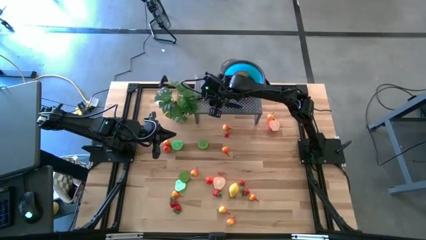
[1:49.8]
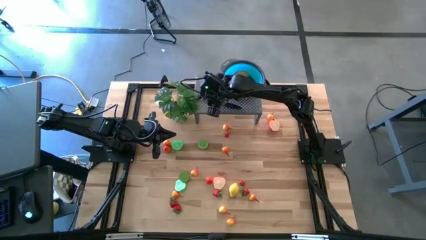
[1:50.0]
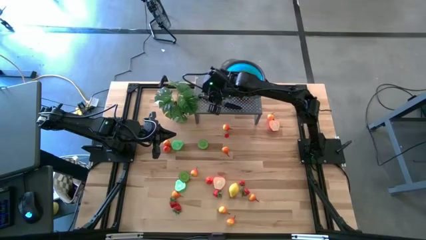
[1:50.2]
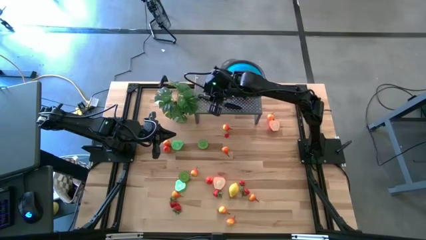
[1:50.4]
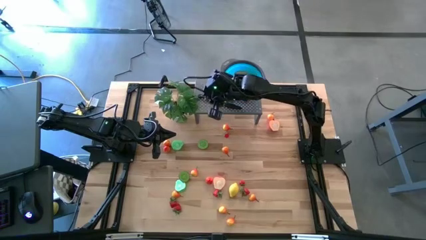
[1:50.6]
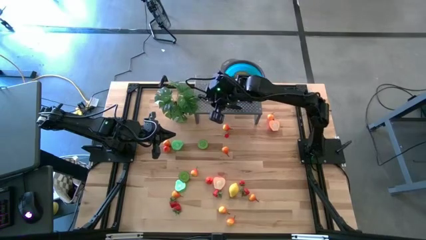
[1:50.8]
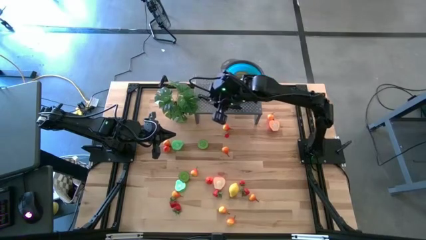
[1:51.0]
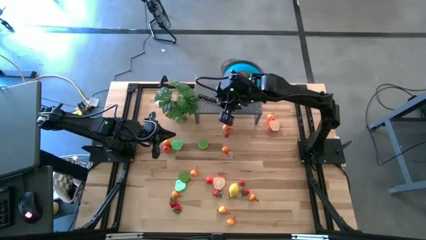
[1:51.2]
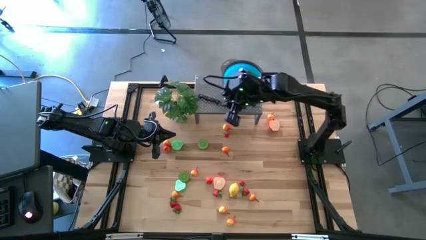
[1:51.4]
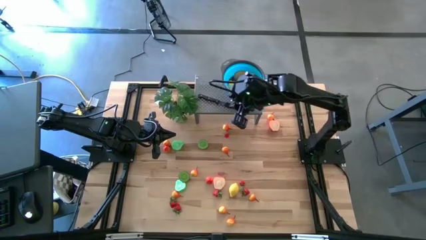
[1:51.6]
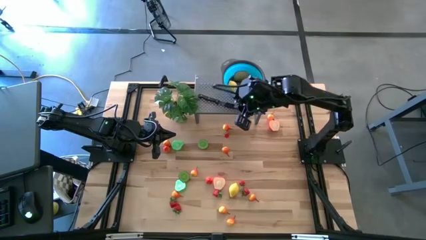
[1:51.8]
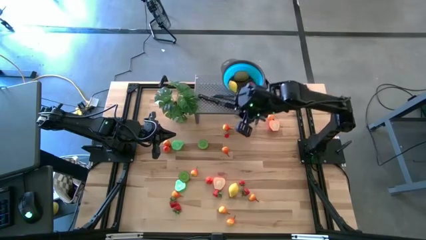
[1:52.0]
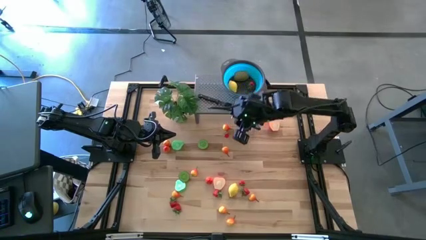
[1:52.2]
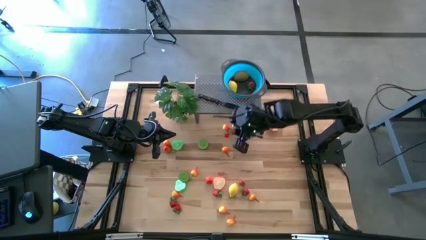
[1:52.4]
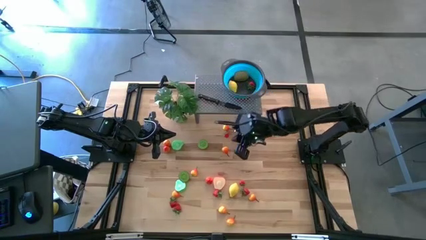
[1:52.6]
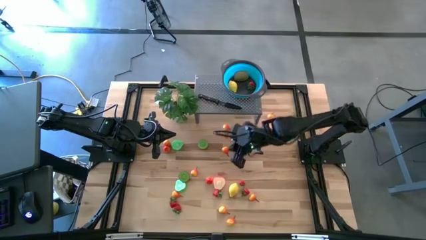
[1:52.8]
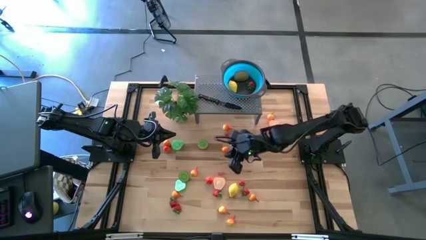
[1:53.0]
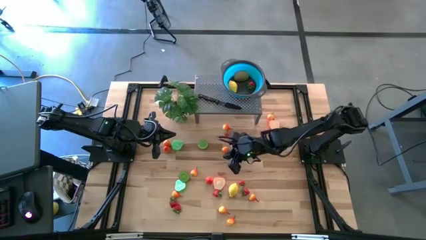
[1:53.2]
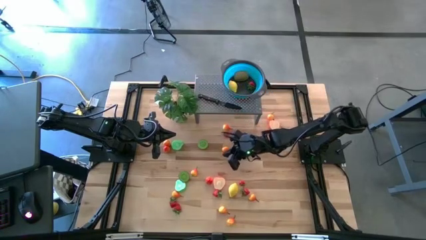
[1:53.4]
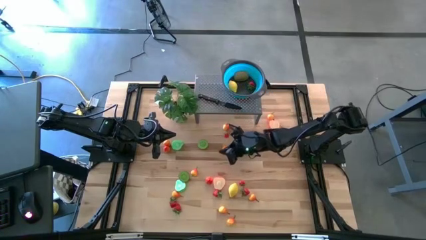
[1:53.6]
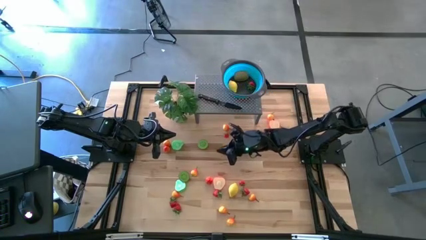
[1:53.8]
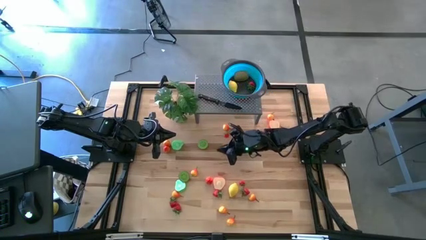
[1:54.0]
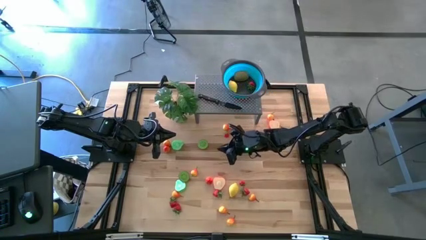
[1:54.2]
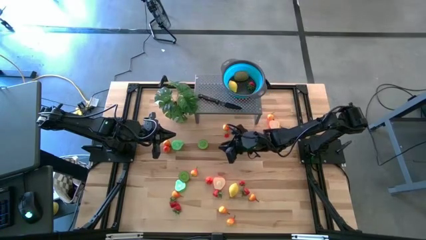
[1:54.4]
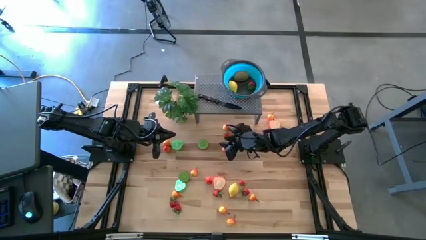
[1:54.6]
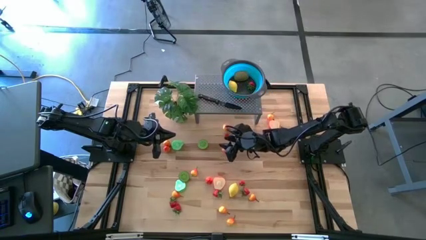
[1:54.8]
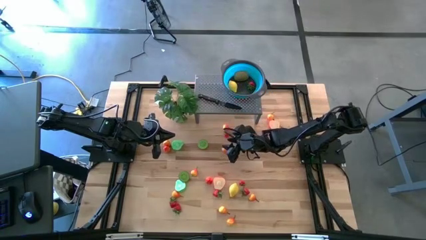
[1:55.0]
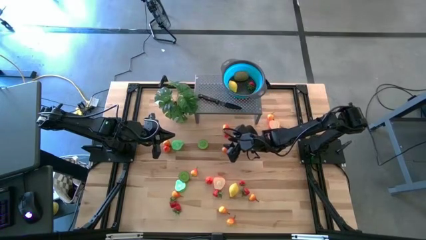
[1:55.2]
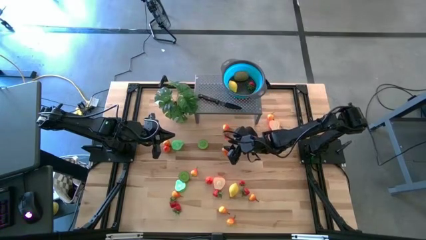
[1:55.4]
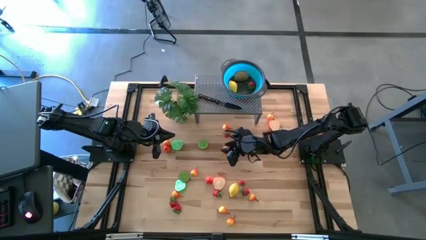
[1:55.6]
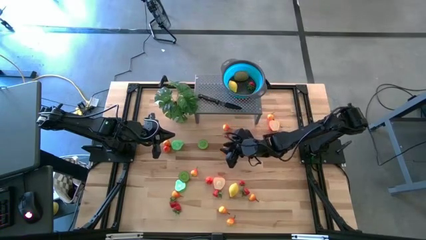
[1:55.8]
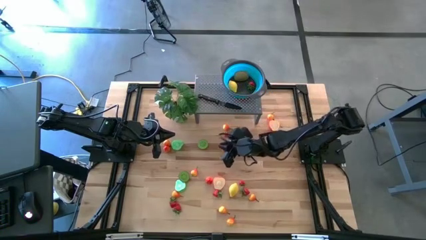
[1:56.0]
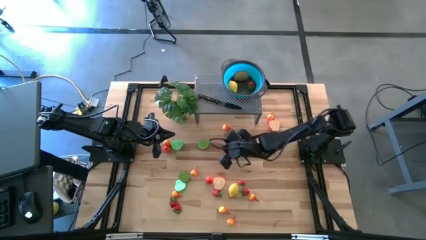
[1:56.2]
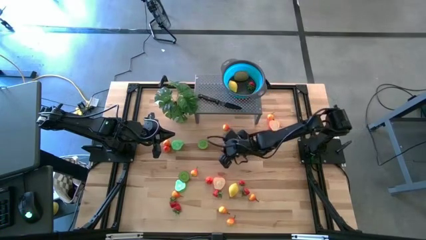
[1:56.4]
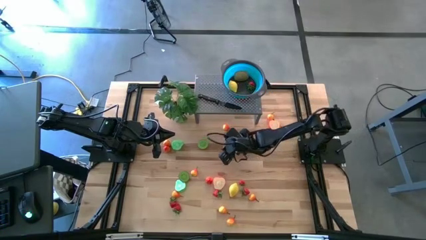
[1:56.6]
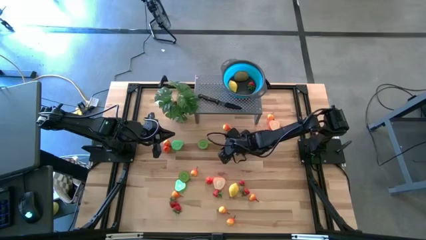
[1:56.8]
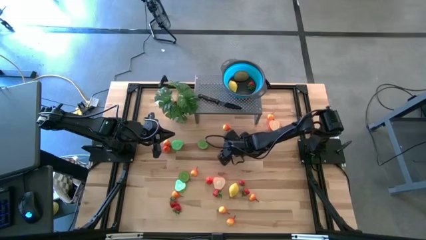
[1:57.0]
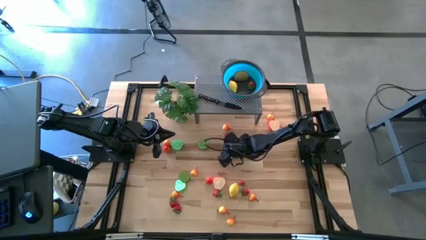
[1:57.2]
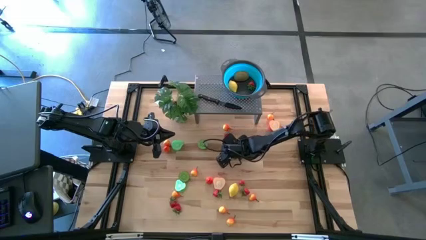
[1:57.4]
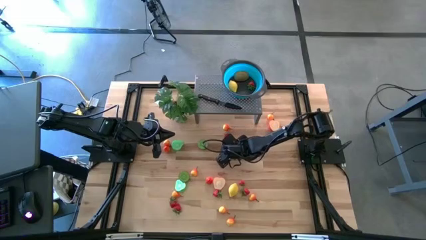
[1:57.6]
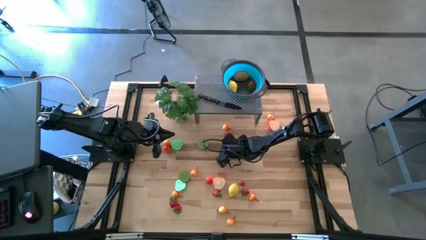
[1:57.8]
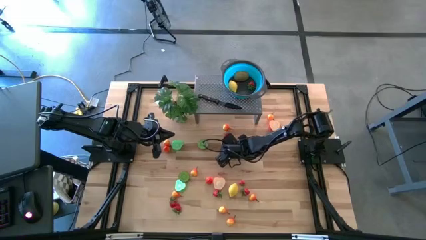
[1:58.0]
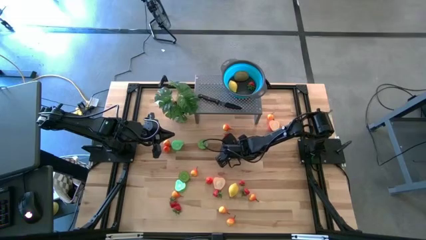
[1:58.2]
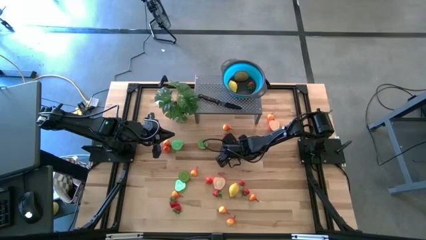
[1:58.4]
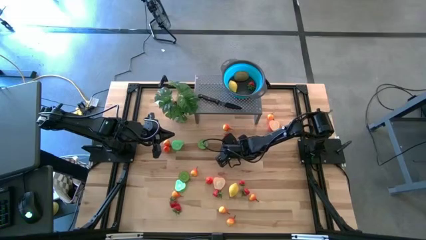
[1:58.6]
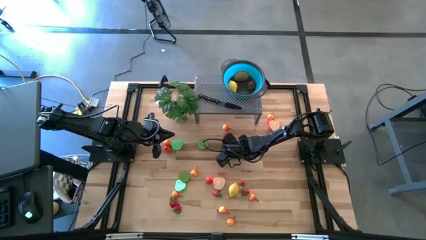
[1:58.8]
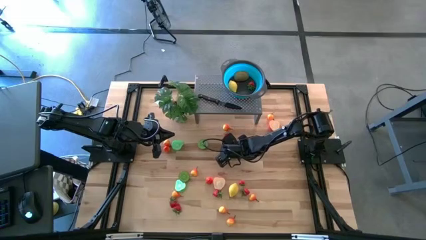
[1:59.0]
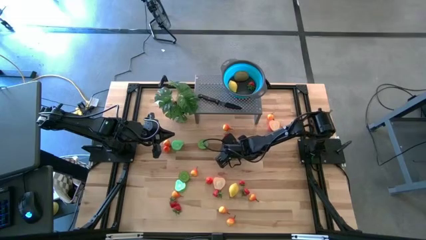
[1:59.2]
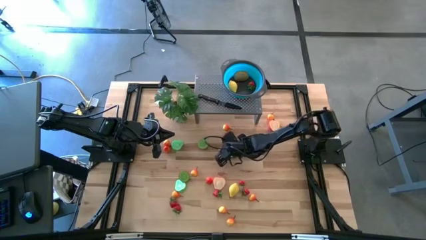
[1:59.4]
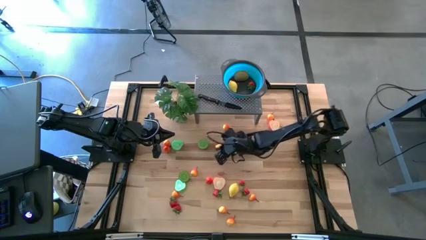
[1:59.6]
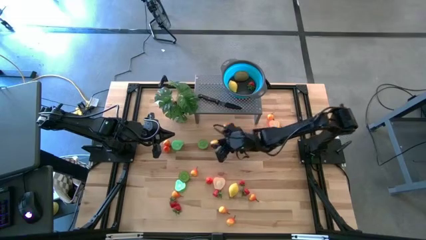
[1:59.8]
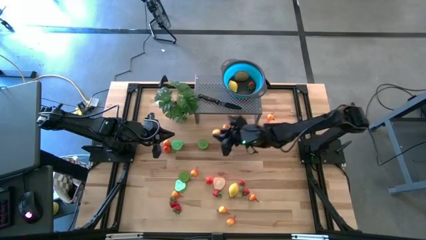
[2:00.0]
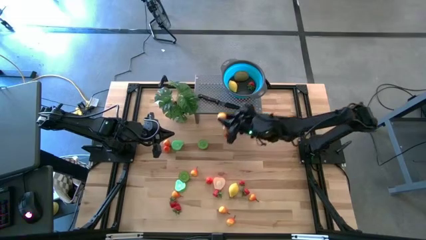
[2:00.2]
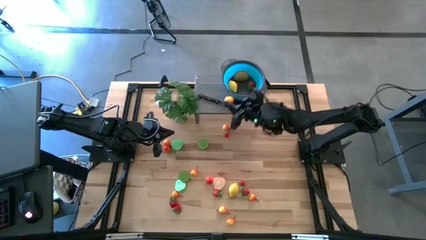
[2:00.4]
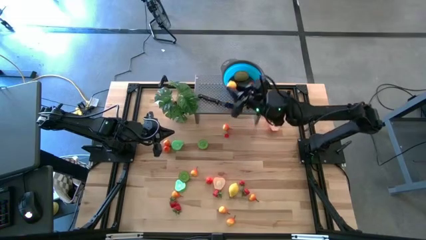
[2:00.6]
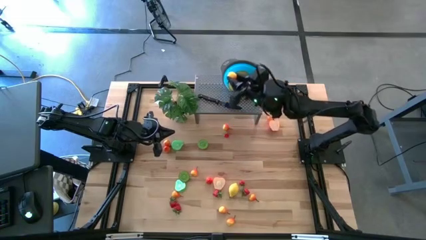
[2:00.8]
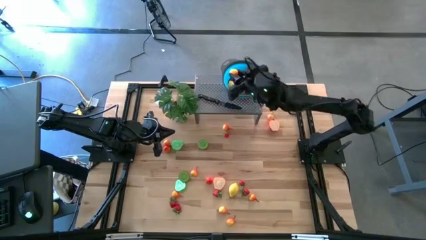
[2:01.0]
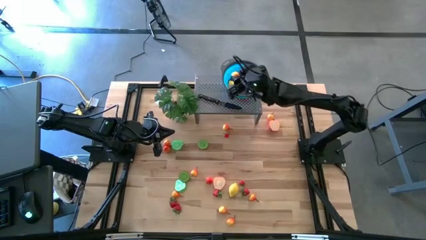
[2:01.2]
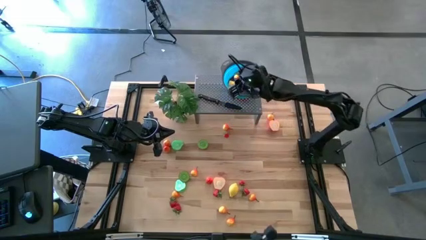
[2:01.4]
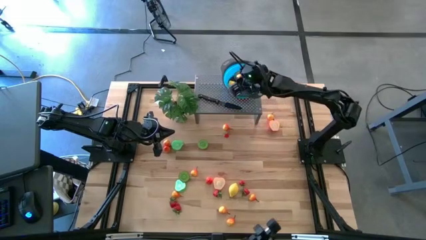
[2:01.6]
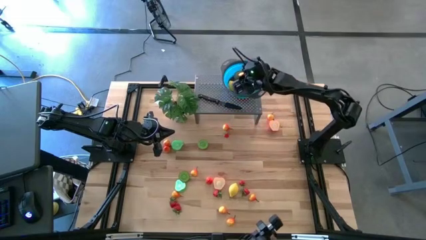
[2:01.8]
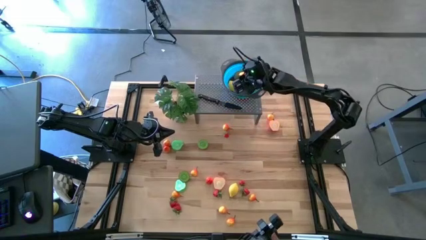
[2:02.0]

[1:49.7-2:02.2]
Task: Pick & Place Fruit
Put the yellow pear in the blue bowl on the shelf

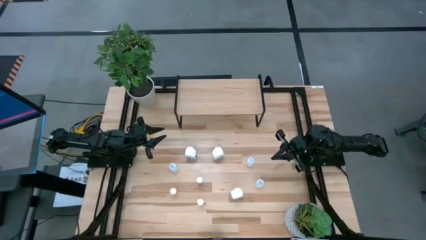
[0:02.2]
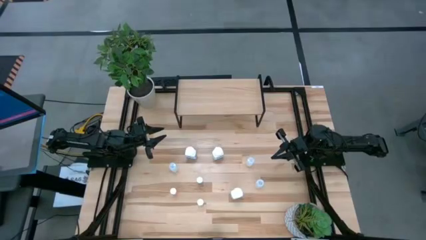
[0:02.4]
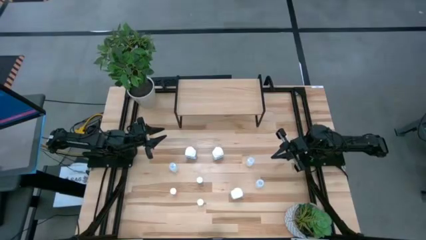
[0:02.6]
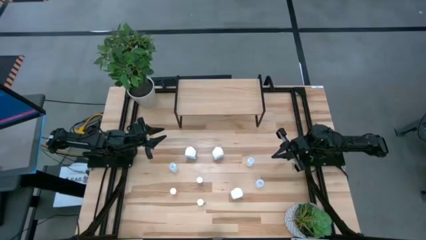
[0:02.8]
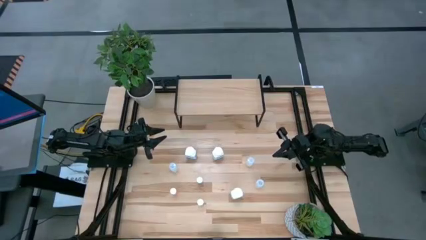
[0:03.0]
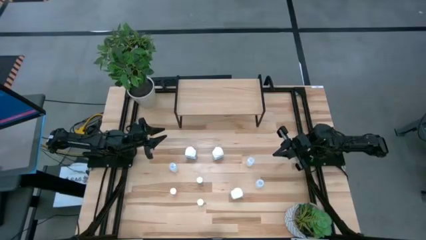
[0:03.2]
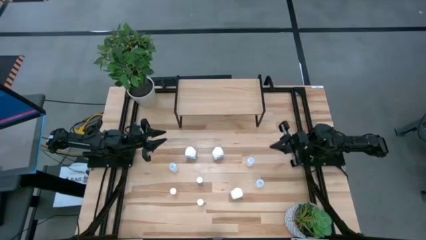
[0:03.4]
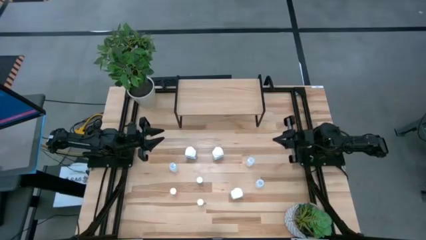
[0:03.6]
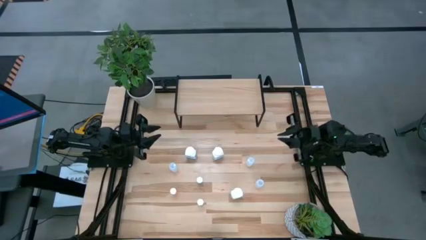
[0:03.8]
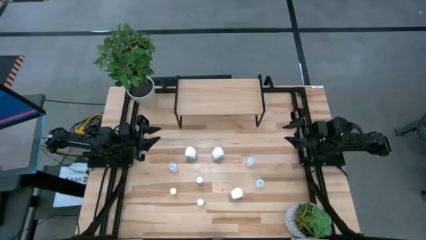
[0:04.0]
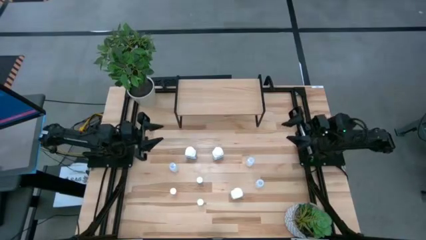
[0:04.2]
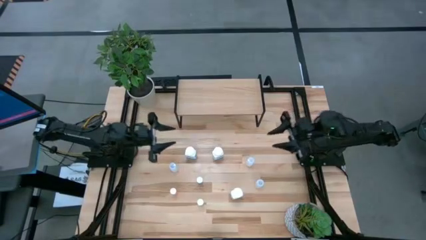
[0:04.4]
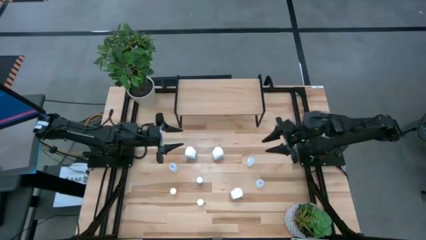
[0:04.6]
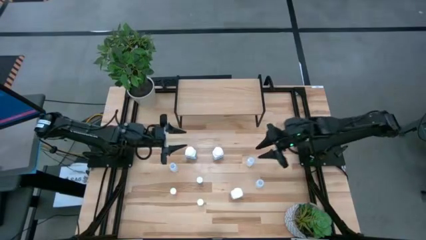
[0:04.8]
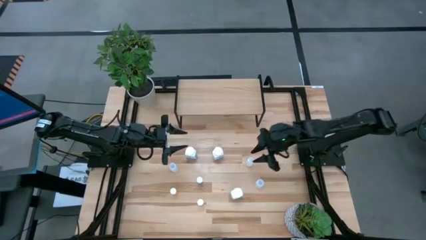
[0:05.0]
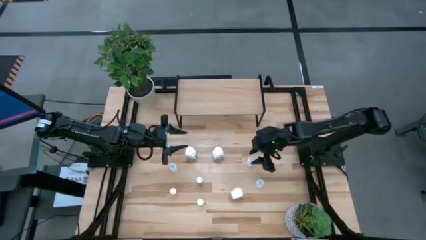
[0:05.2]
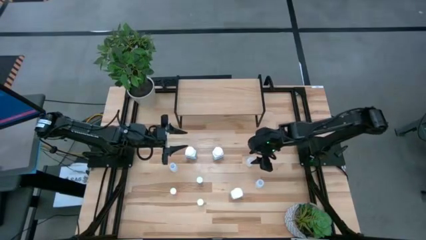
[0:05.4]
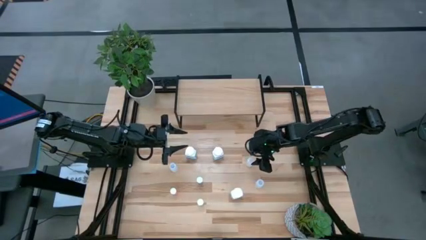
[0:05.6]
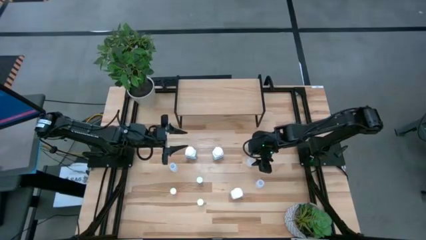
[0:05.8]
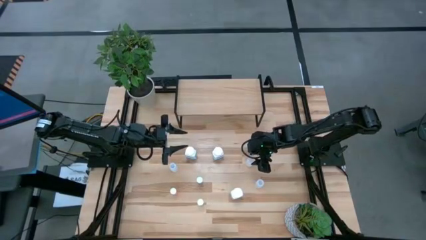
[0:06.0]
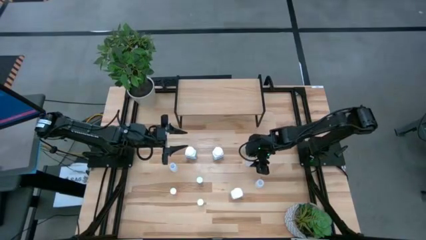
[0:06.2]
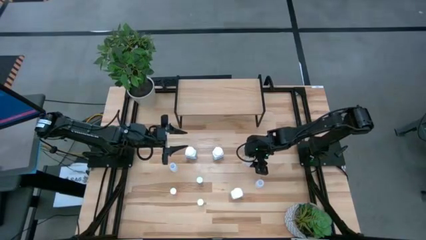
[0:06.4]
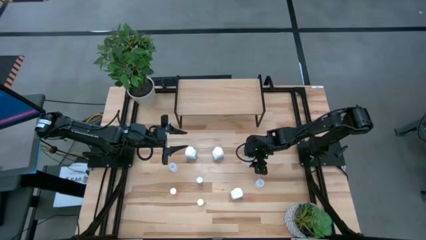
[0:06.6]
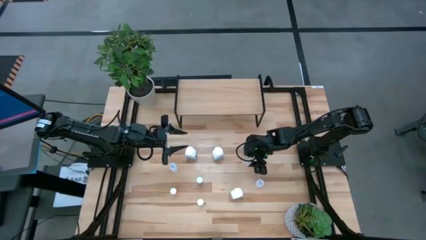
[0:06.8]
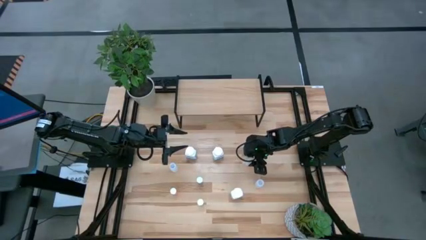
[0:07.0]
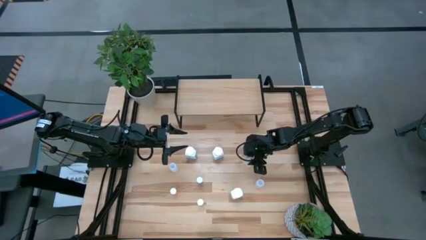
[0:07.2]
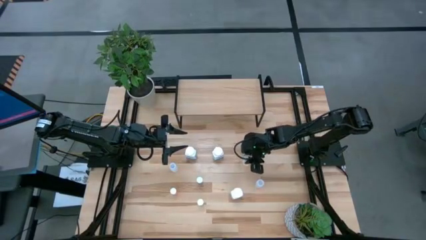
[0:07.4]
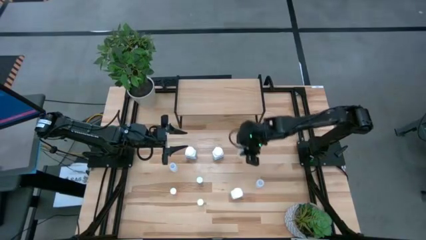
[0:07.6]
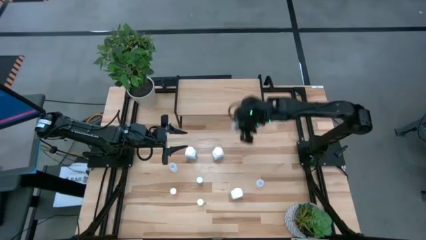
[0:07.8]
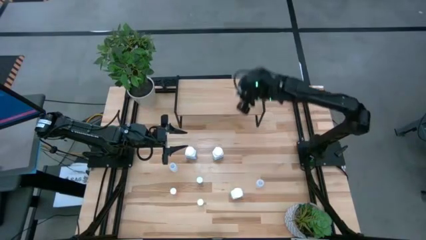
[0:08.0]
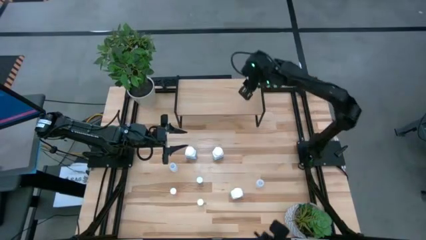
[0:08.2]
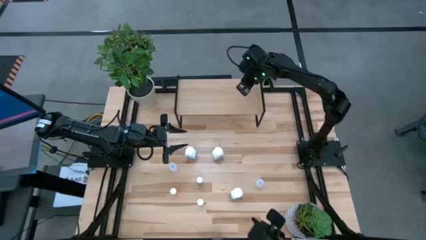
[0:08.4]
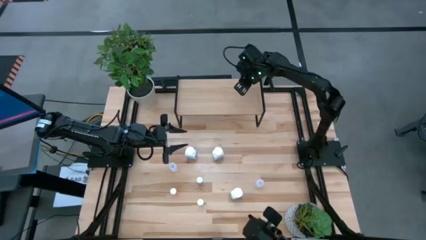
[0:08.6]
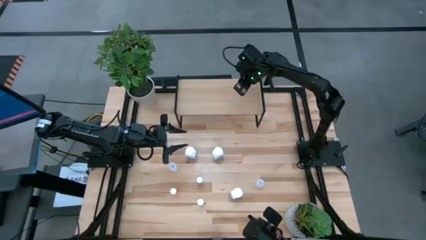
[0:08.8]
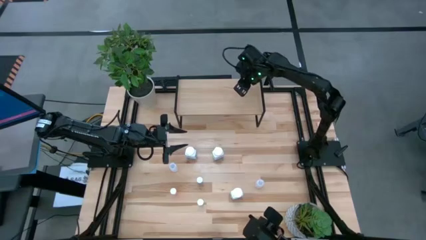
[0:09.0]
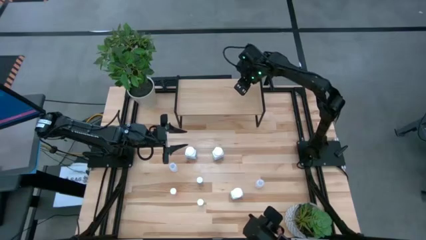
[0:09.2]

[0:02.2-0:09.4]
Task: Pick and place medicine bottles onto shelf by color
Put the top white bottle on the shelf
